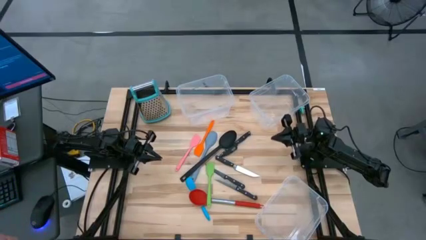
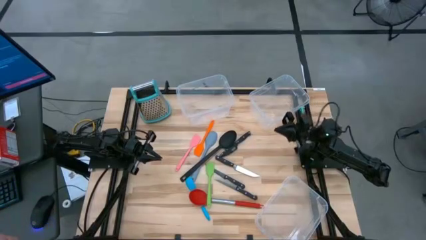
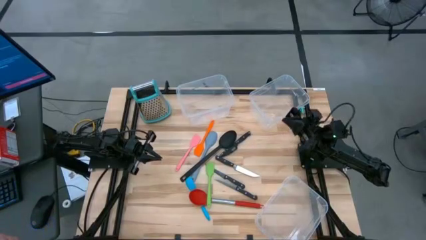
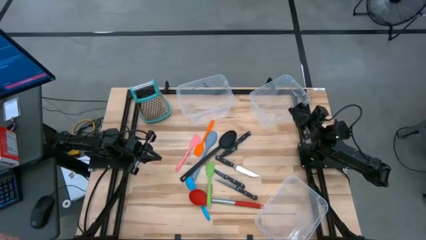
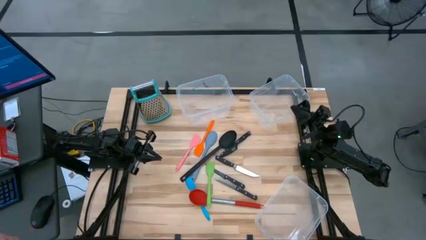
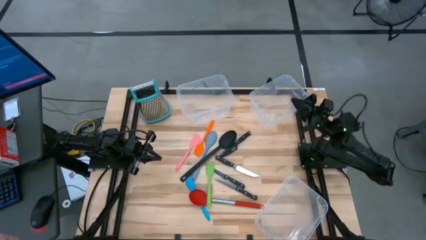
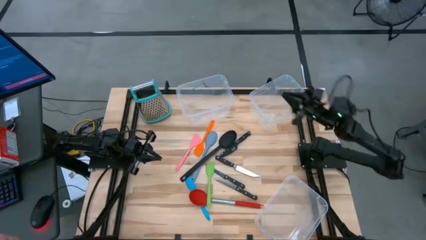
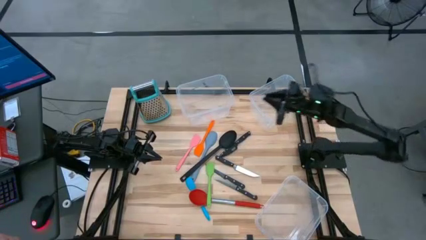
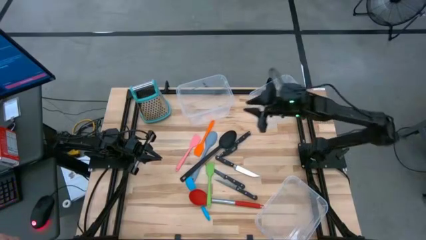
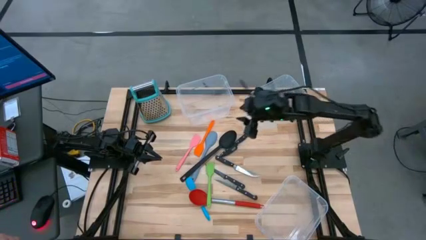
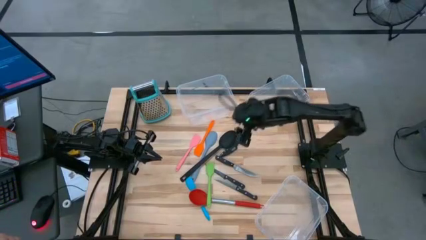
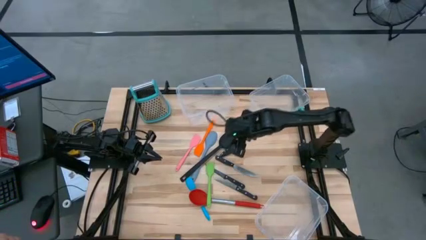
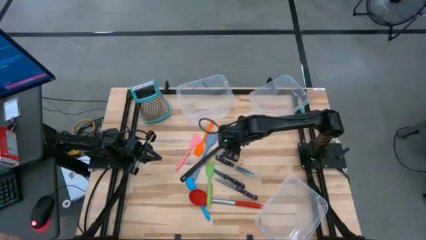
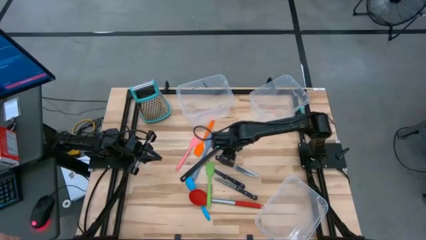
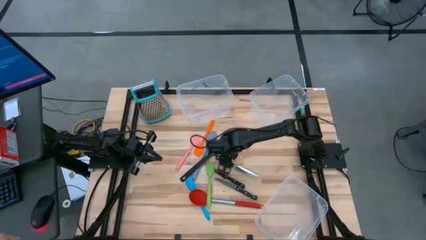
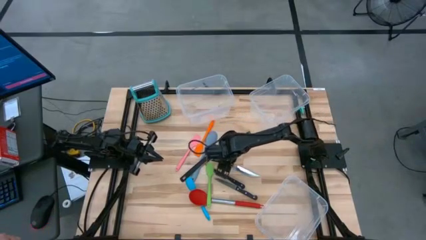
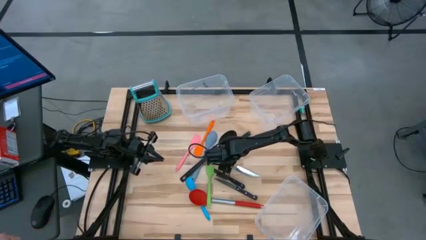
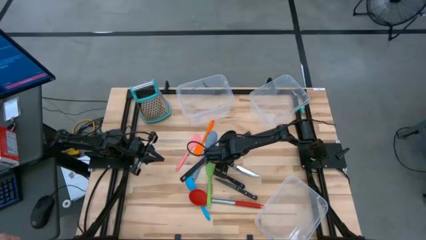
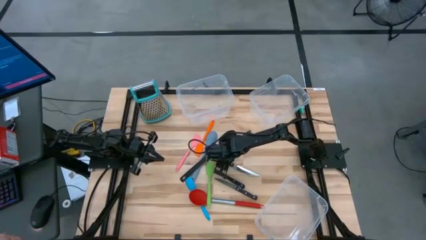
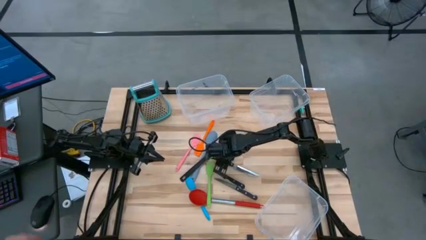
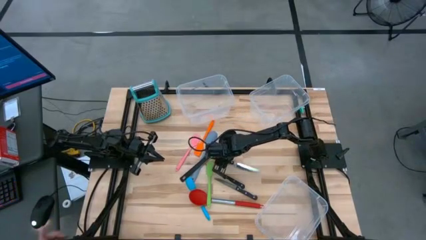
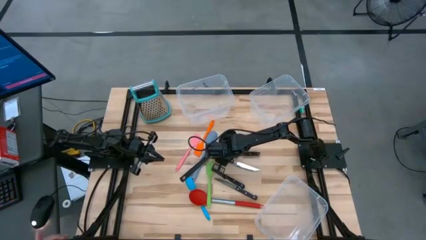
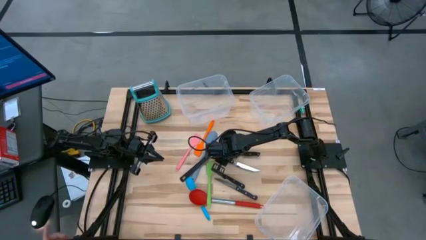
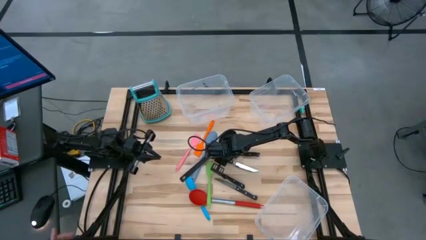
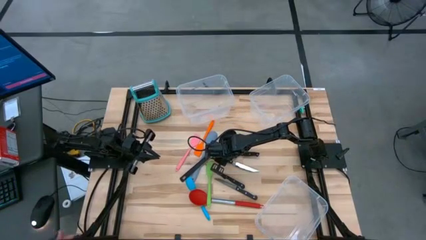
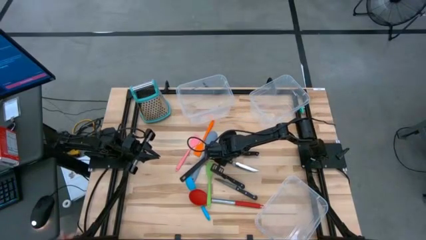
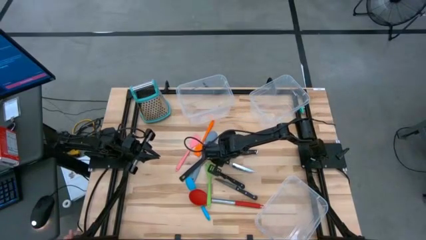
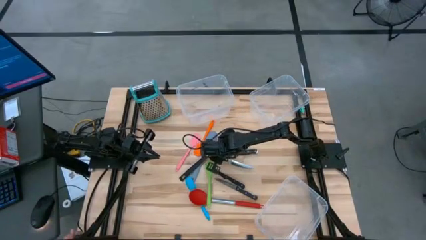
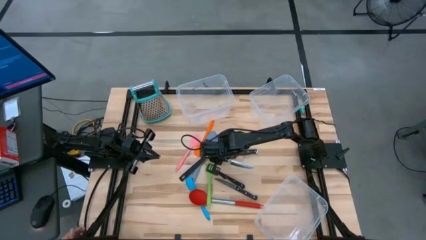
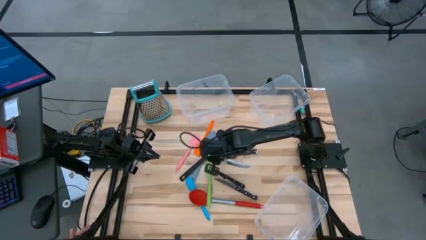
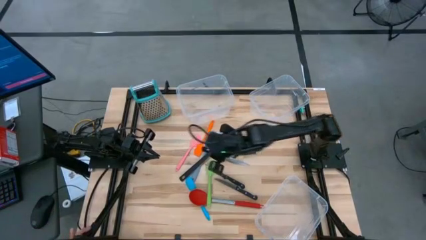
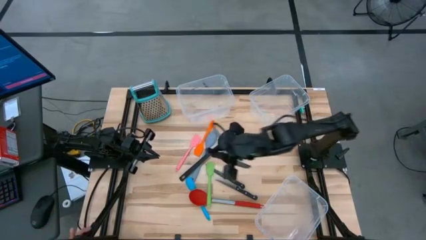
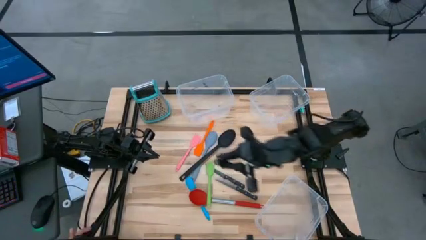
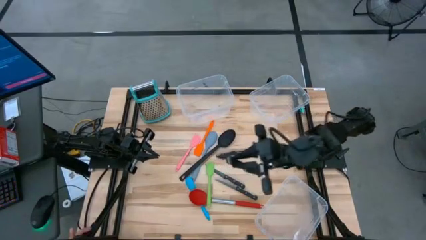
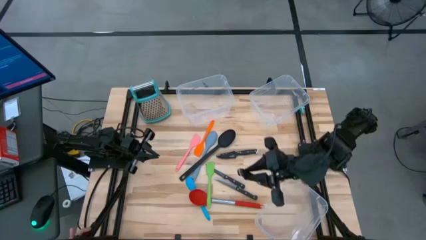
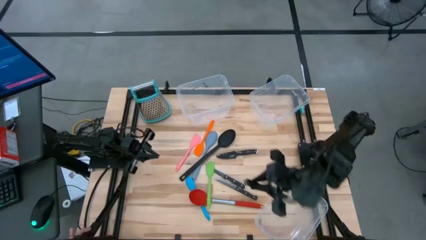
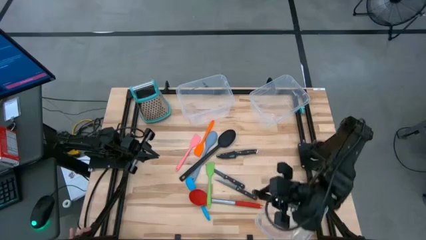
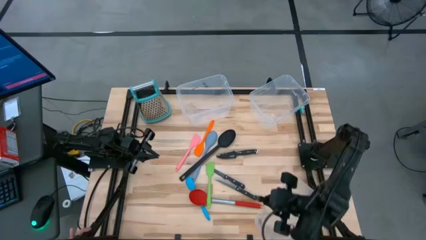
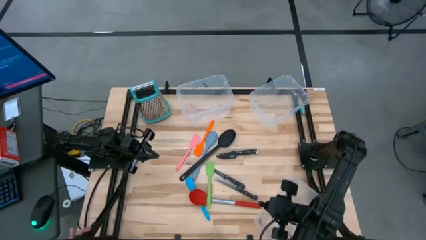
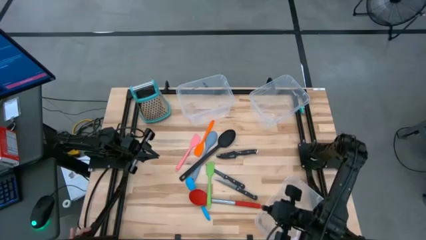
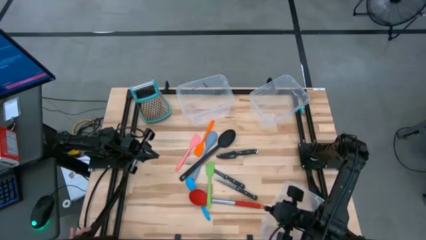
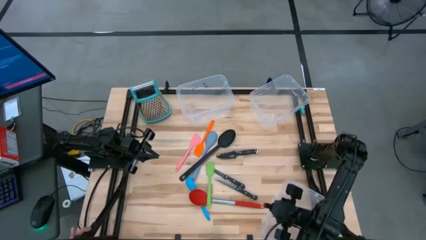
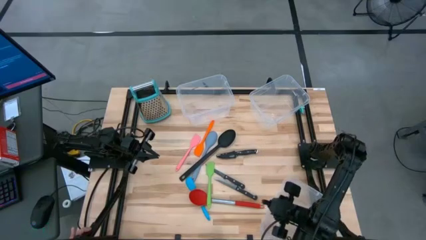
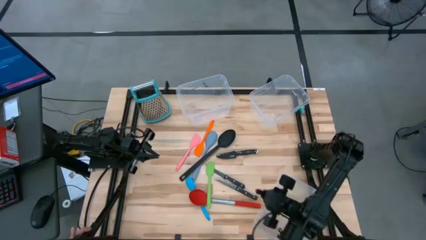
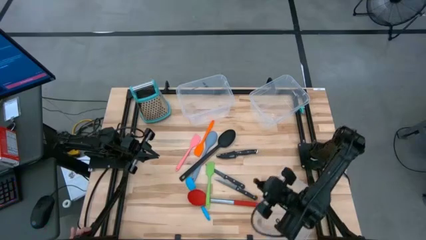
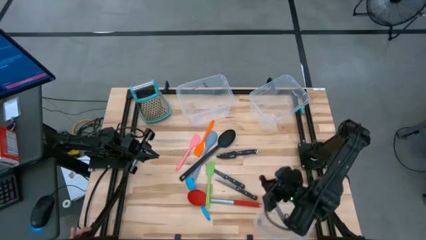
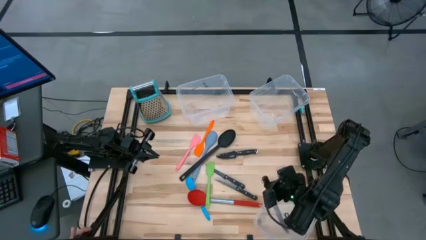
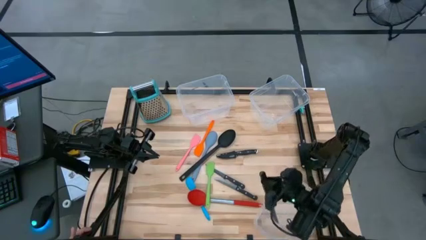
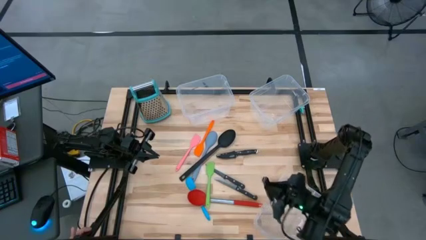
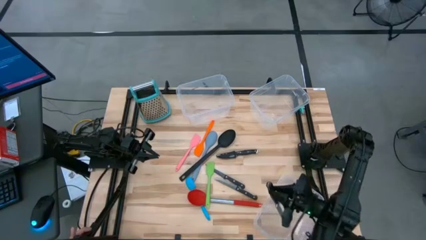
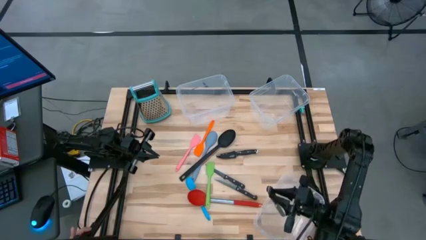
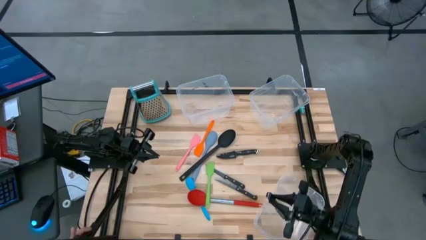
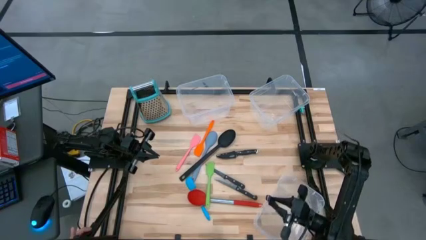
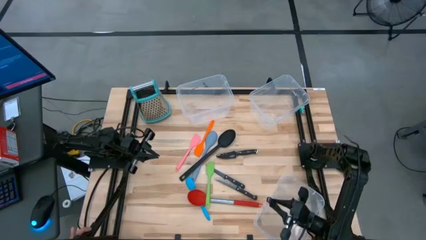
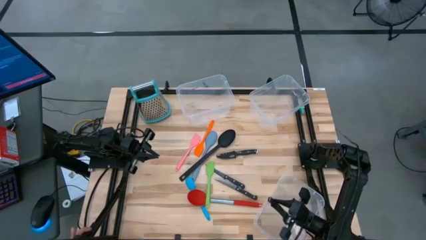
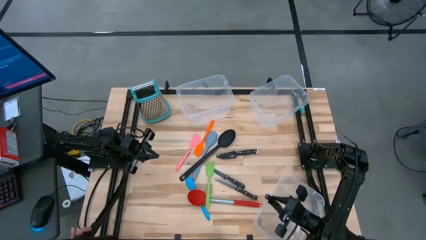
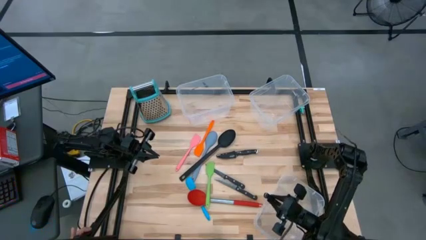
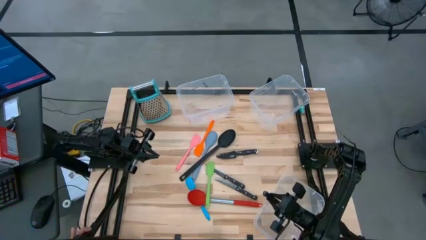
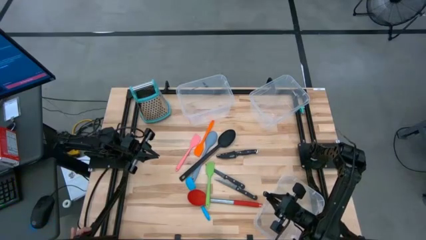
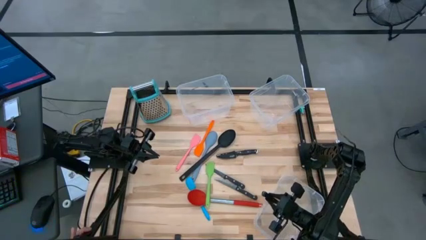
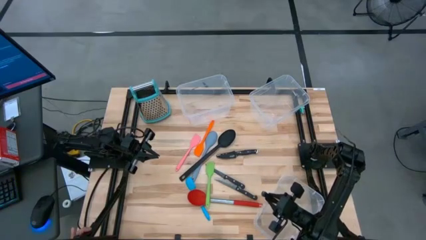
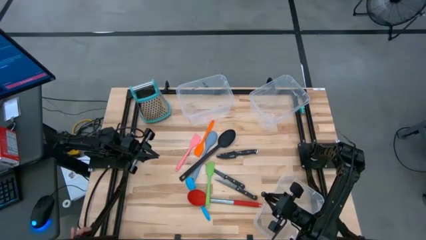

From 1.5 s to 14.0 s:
Task: Pick & Place Kitchen Items
Put the bottom silver knife into the bottom transparent bin
